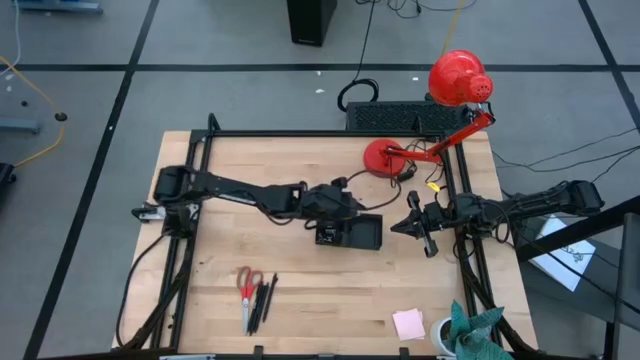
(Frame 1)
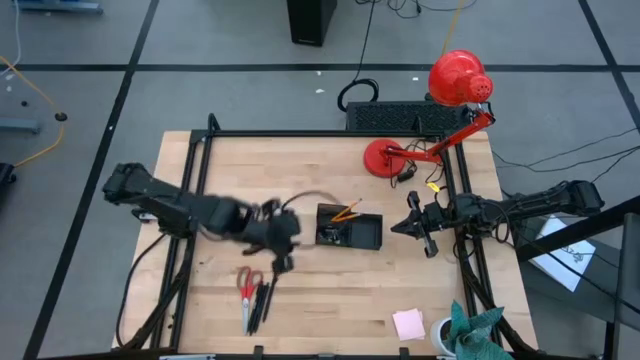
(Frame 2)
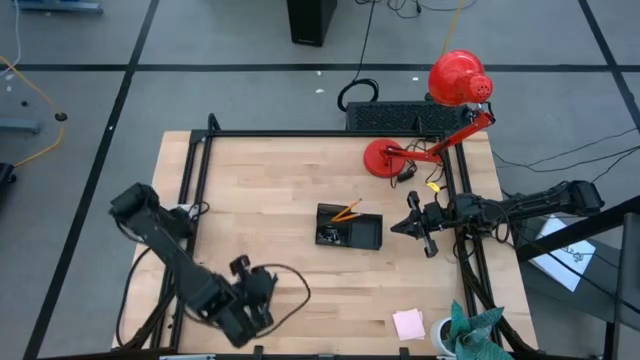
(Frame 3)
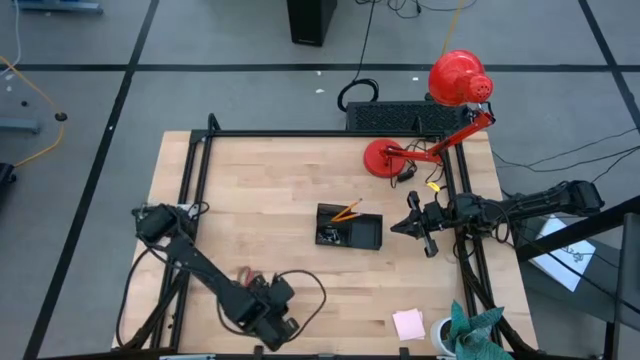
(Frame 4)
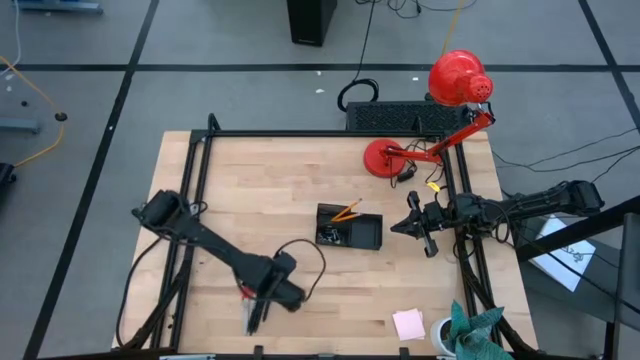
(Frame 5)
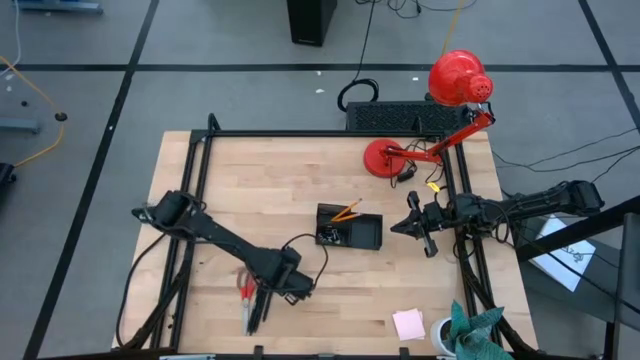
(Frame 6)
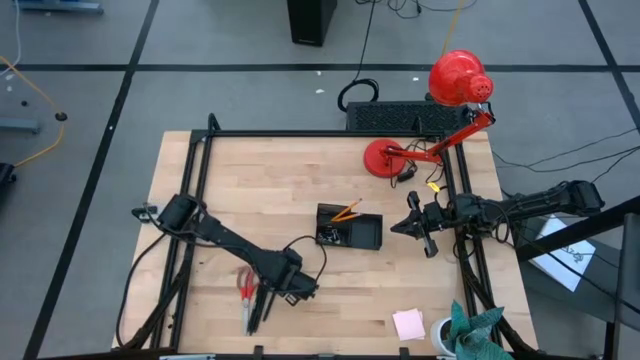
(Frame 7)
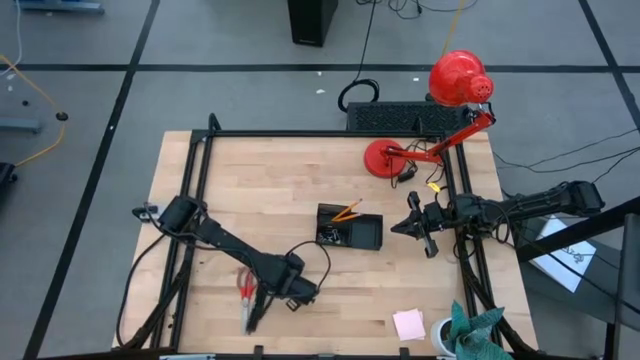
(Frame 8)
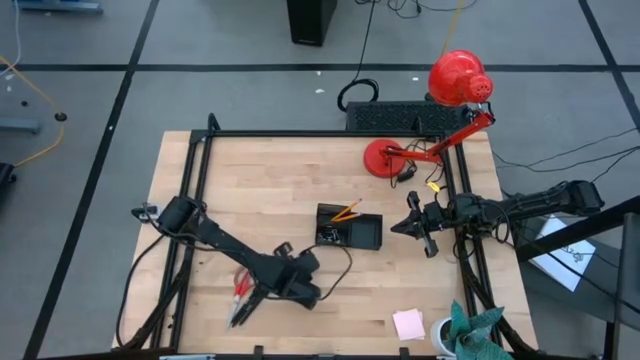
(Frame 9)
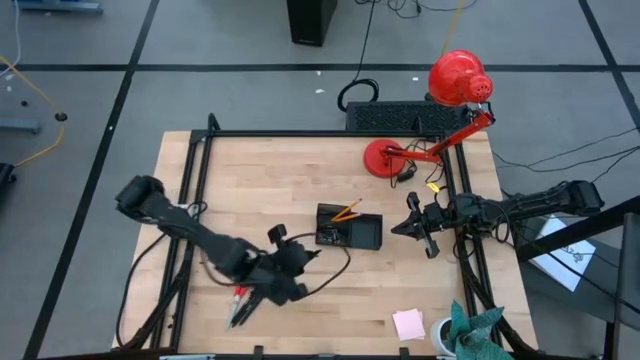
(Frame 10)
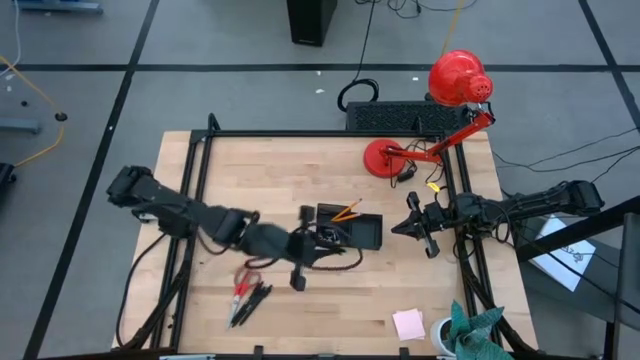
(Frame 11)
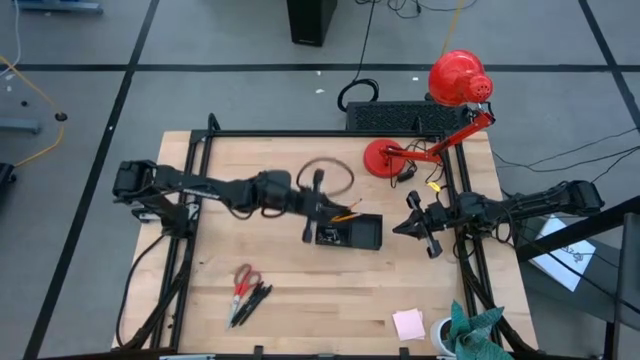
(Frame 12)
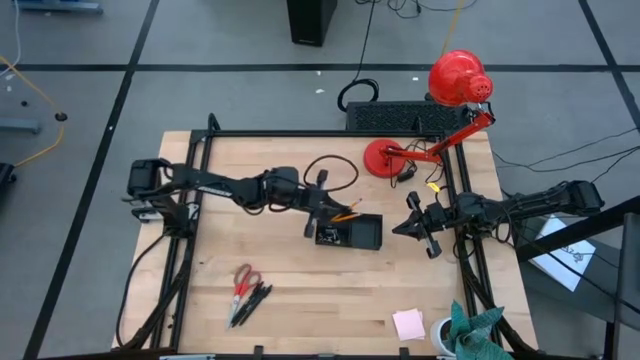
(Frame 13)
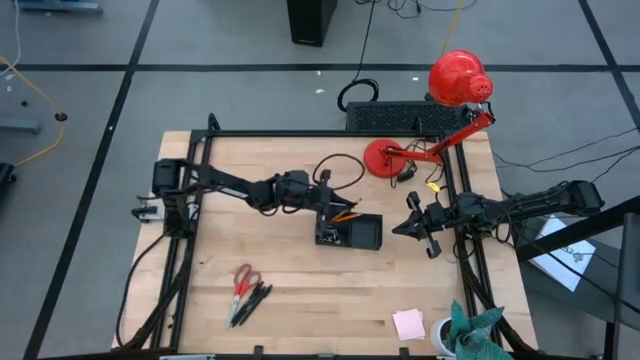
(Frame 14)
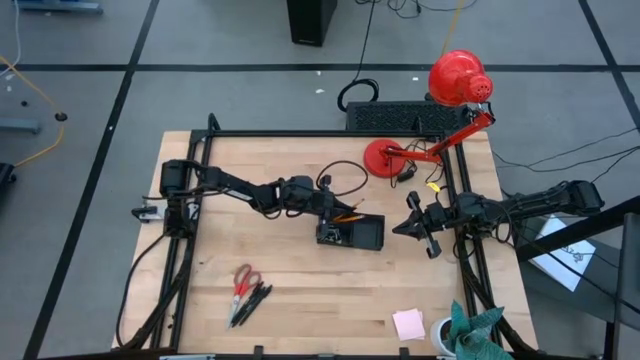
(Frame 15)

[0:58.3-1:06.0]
Task: Pick and place office supplies into organizer
Put the black pen into the desk organizer

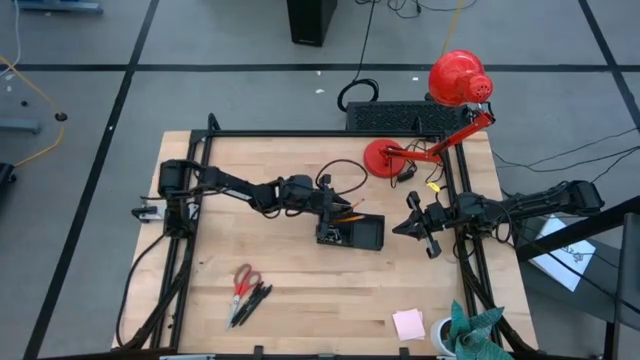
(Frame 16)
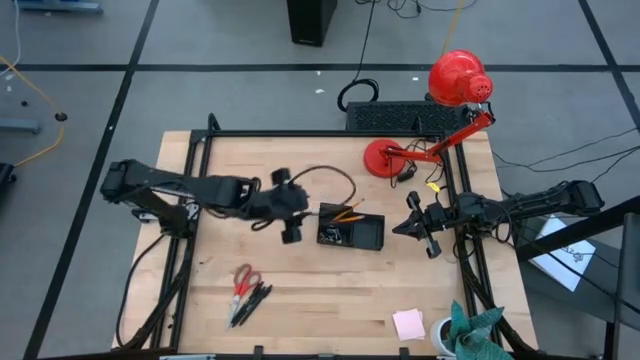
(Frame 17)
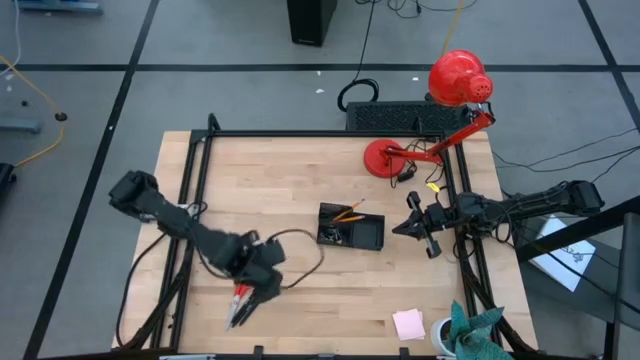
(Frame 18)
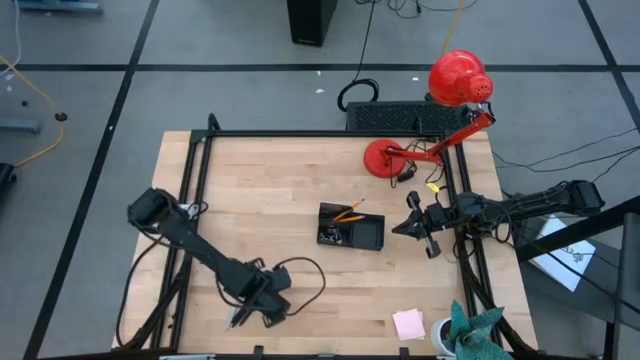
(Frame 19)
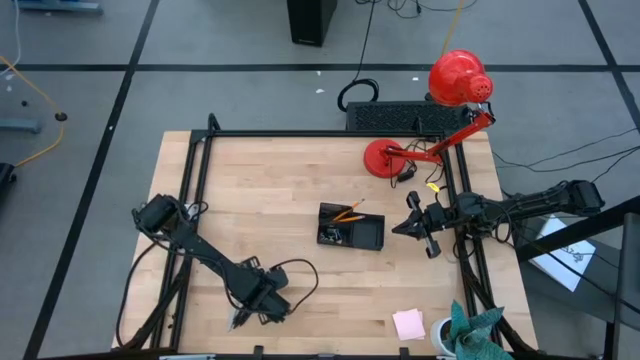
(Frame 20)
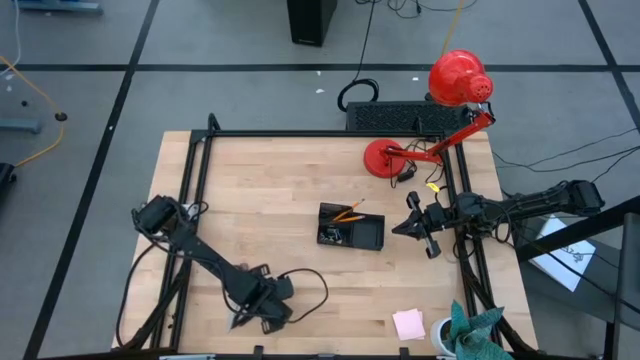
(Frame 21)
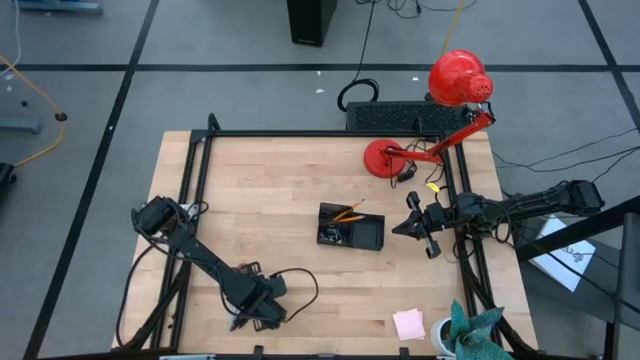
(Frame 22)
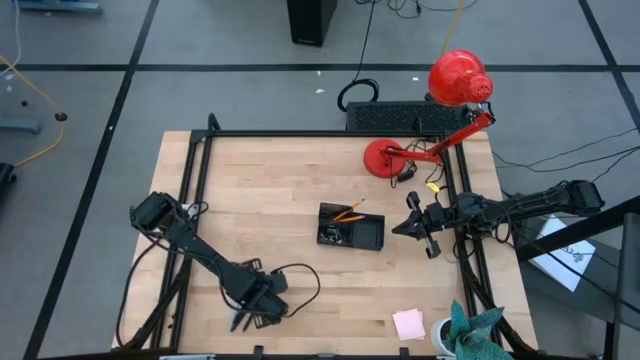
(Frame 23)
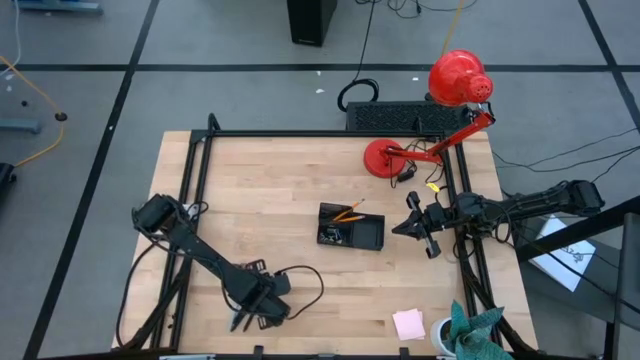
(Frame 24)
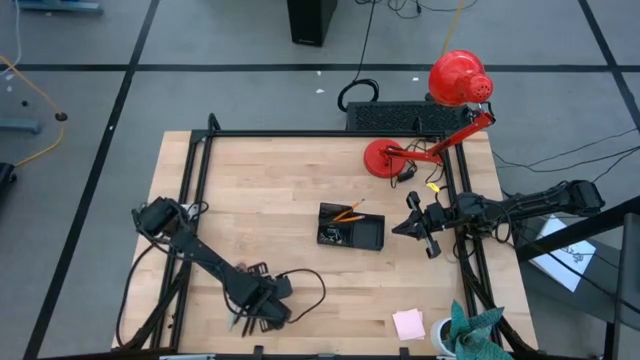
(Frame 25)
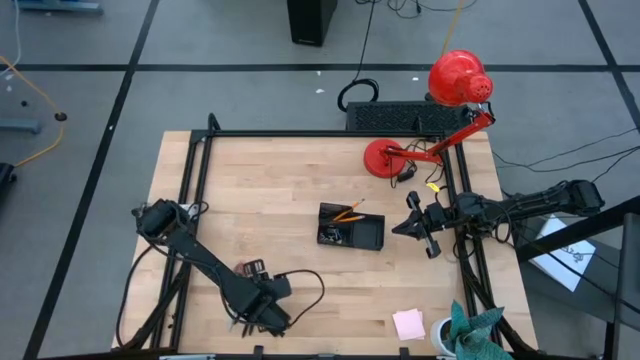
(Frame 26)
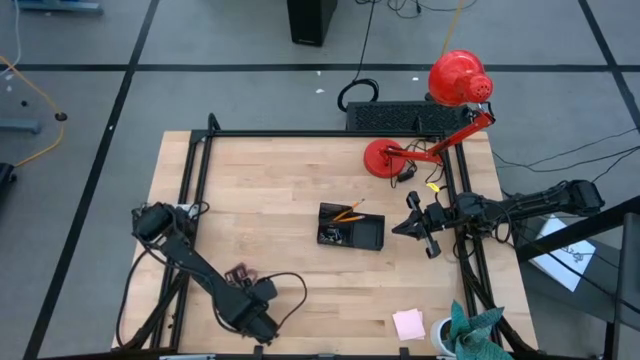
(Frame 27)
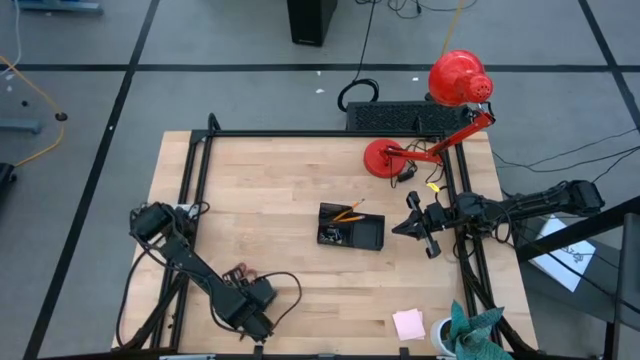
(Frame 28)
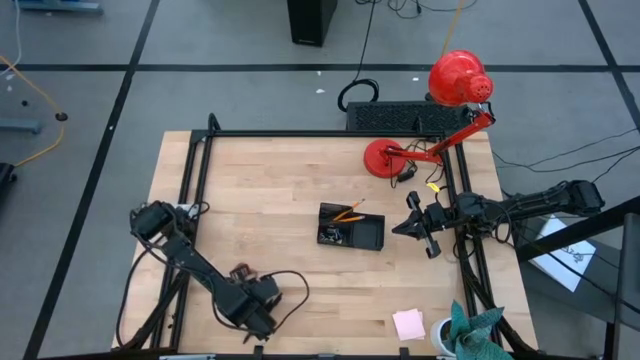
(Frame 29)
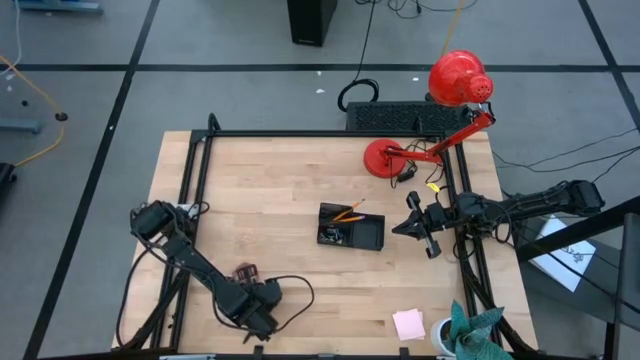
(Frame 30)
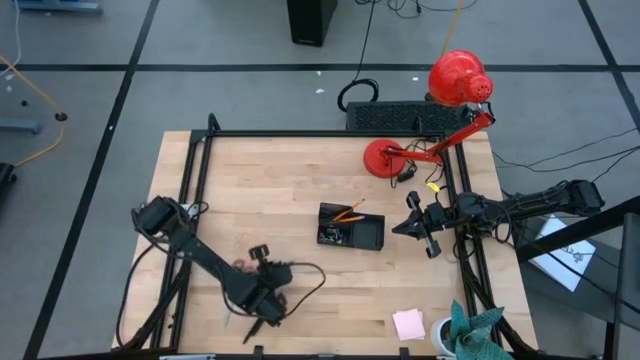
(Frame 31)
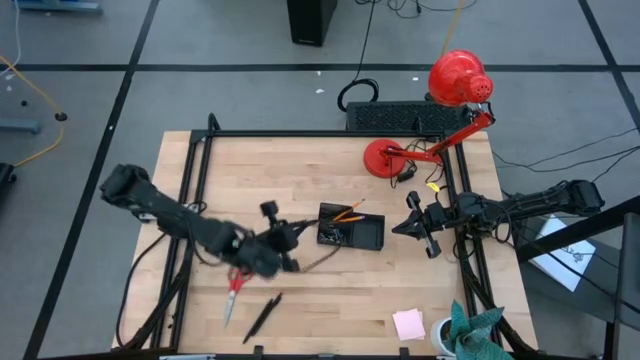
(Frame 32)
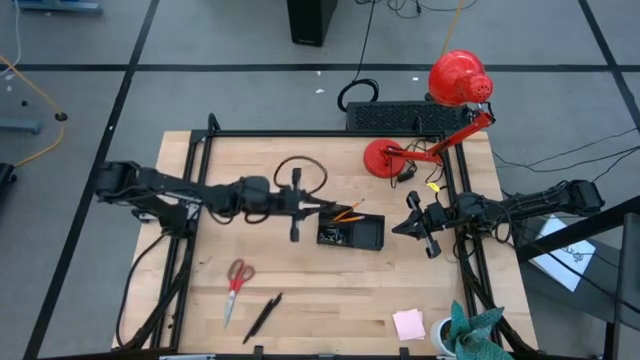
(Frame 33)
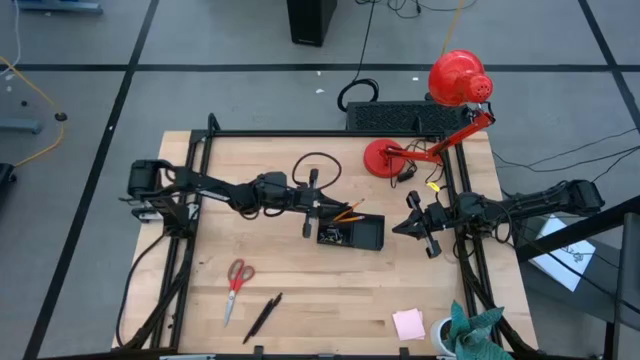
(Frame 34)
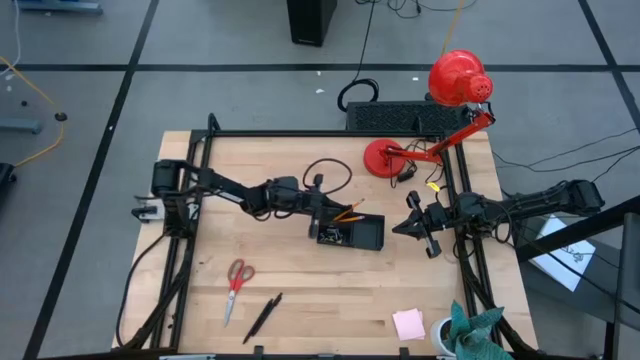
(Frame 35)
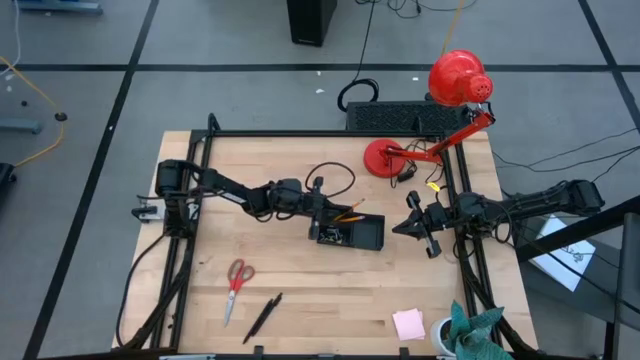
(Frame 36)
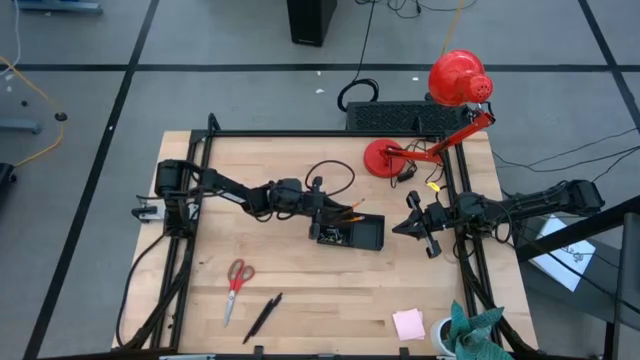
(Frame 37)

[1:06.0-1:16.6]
Put the black pen into the desk organizer

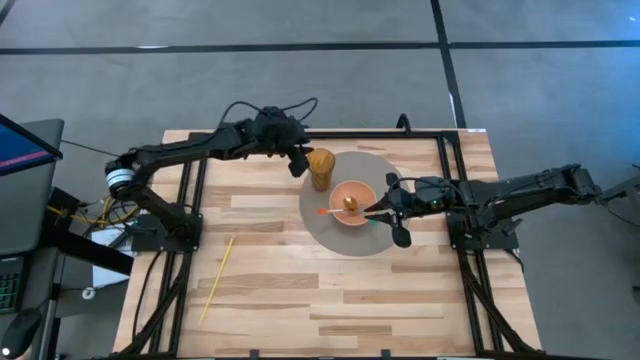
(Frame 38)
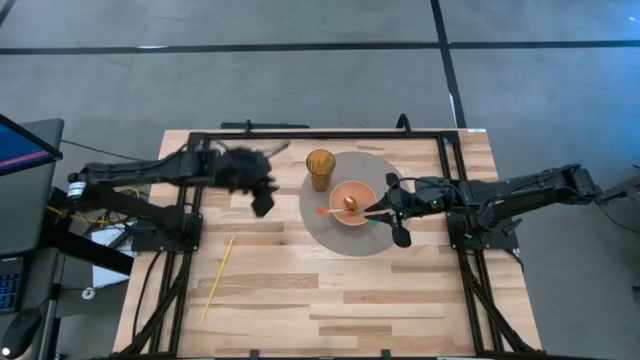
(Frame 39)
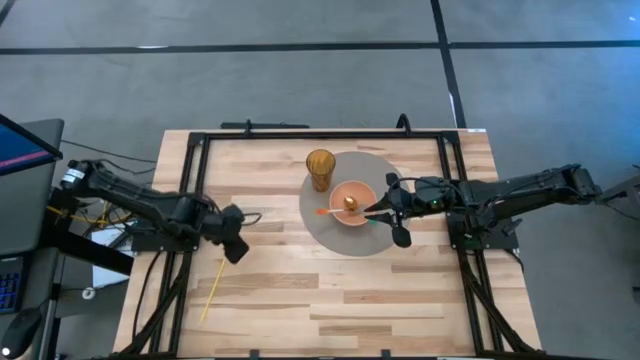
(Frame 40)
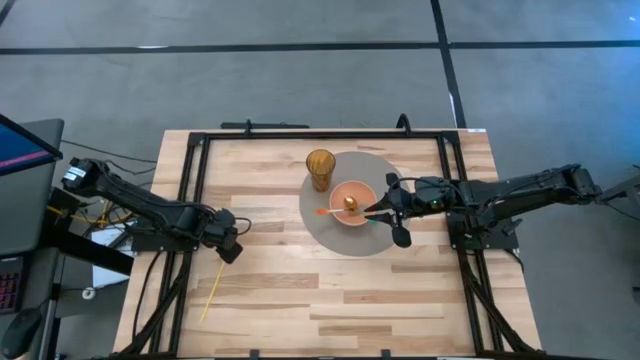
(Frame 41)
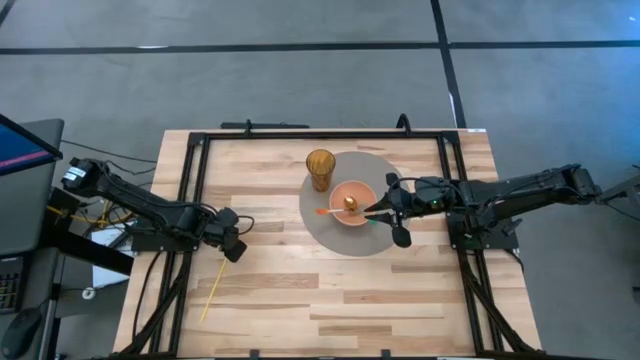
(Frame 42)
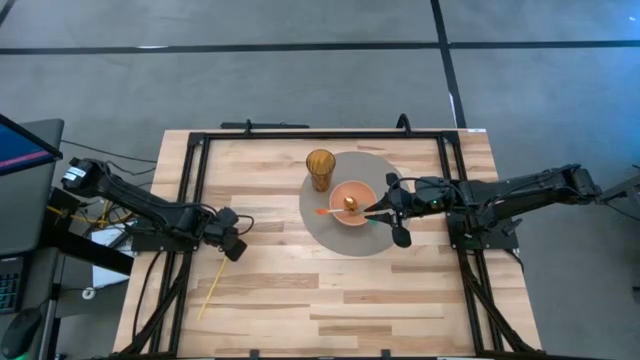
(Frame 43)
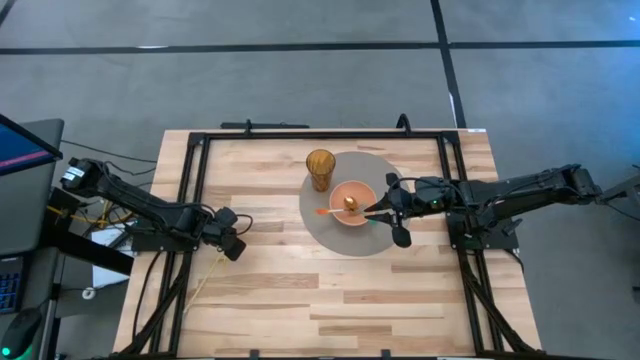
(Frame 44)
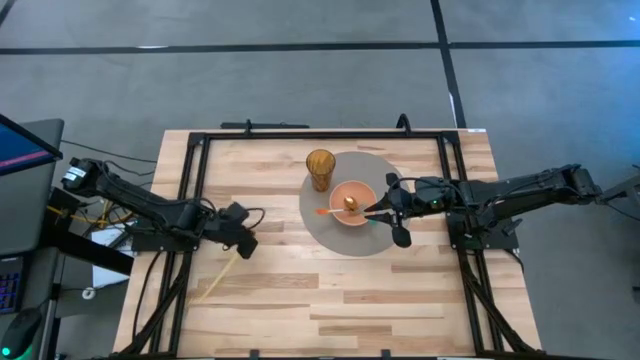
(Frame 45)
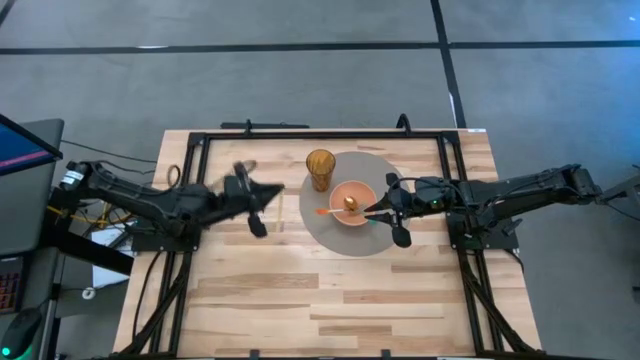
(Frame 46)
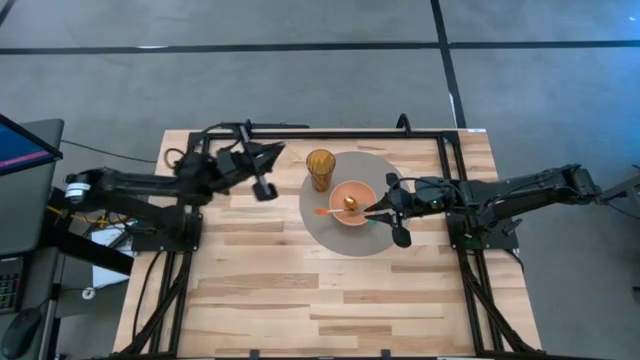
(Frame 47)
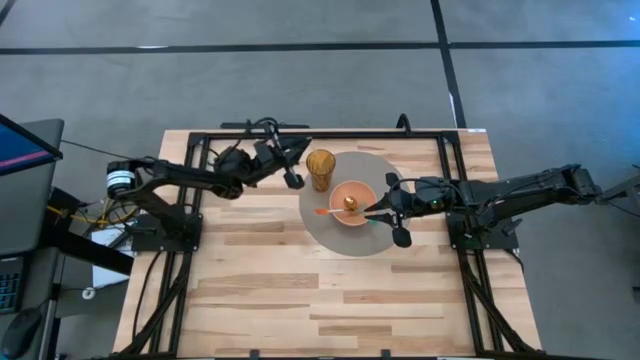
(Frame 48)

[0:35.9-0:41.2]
Task: Pick & Place Utensil
Put the yellow straw into the brown cup
